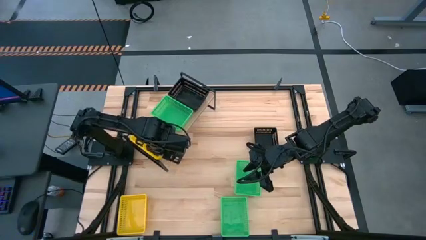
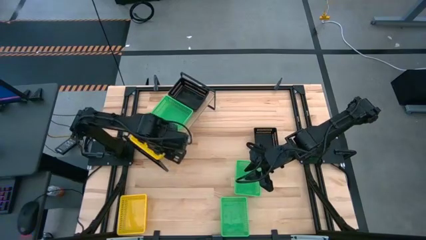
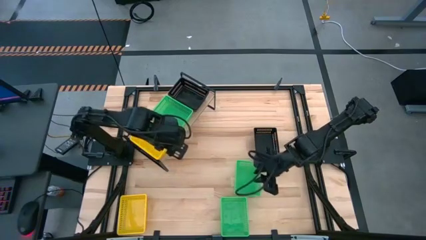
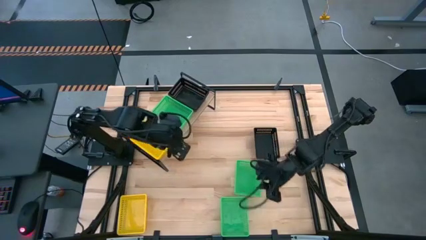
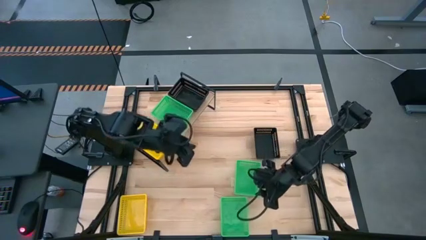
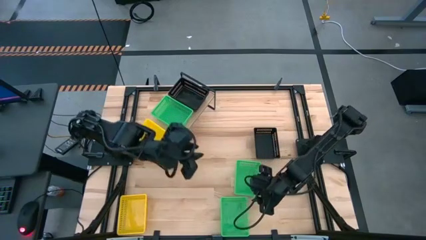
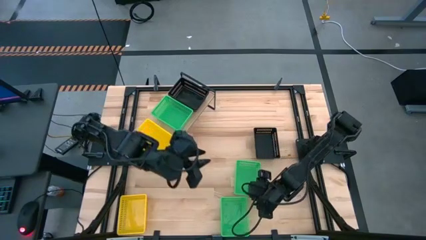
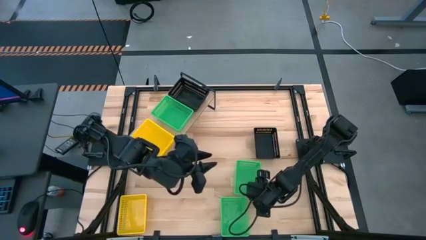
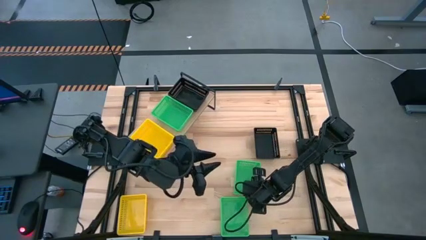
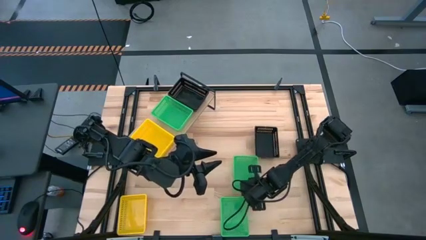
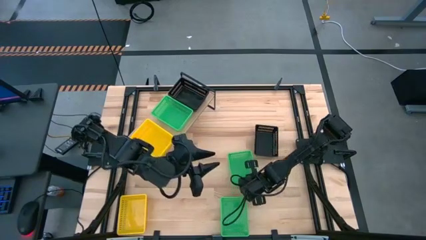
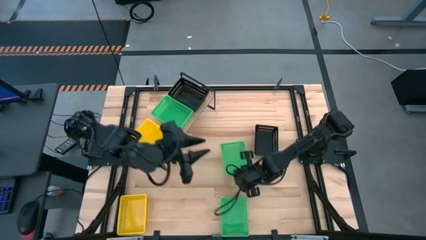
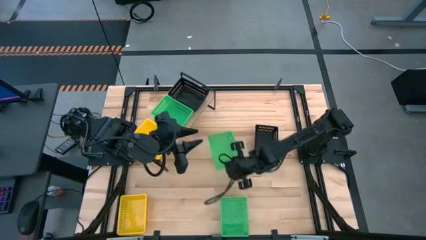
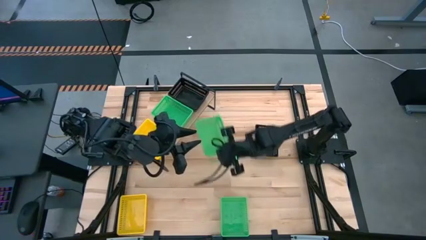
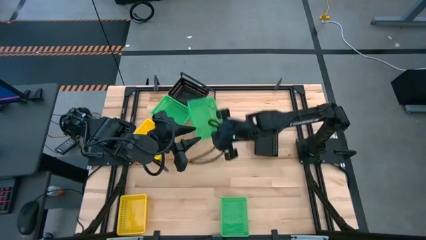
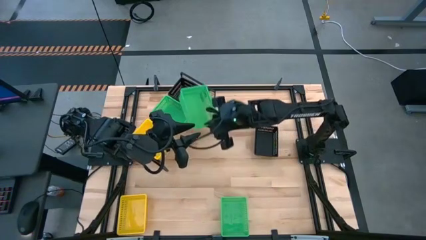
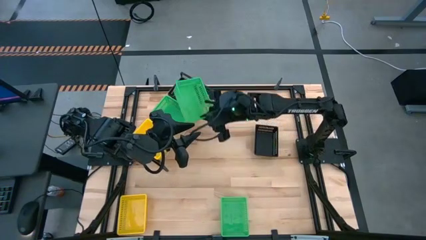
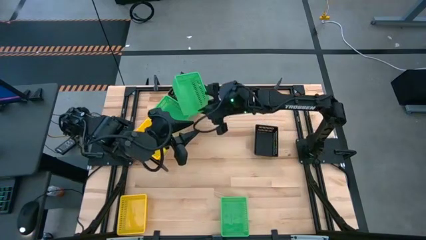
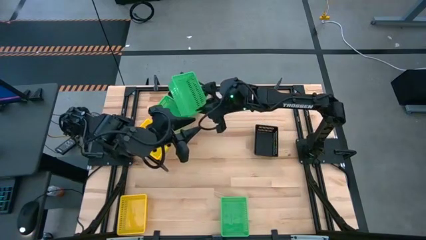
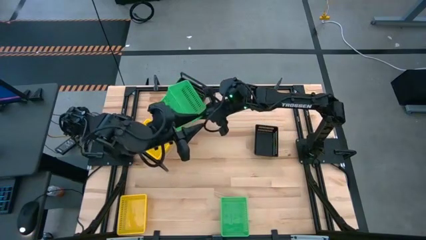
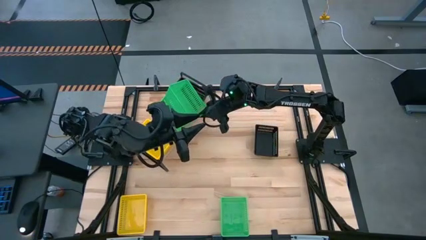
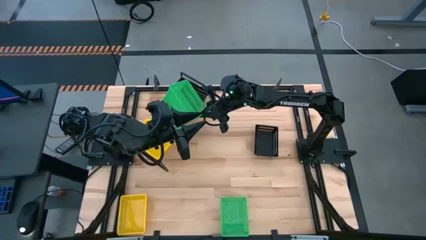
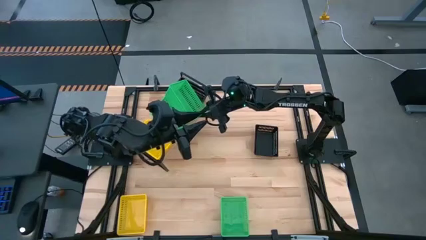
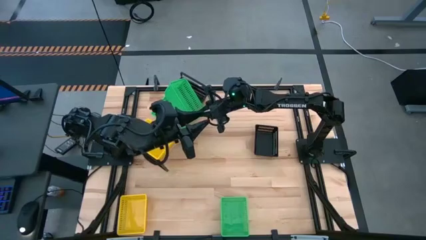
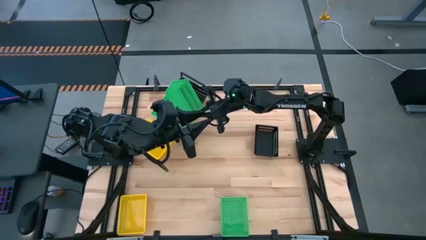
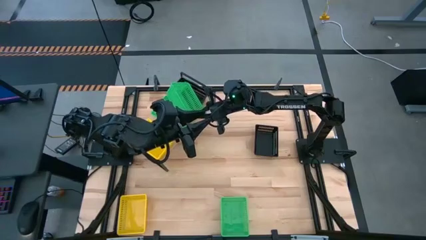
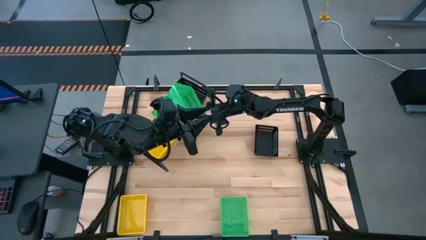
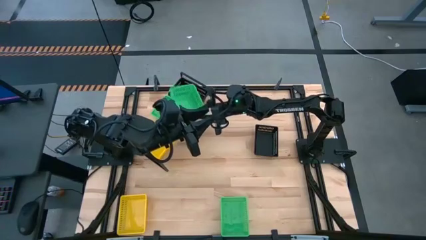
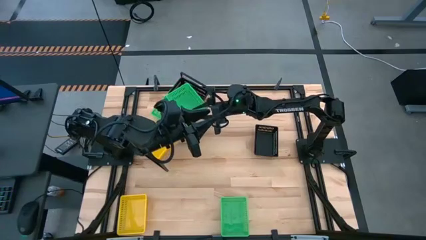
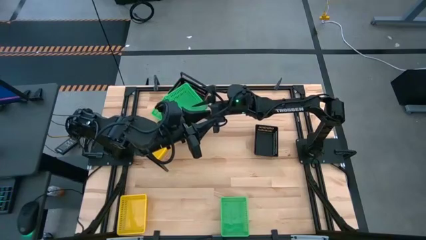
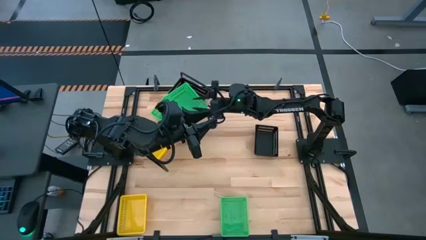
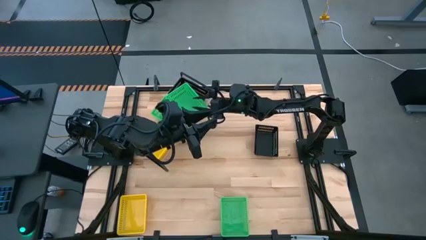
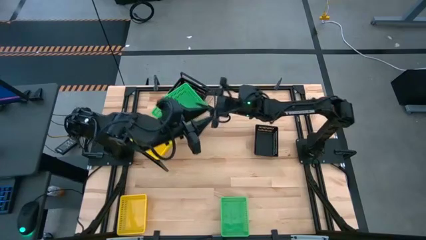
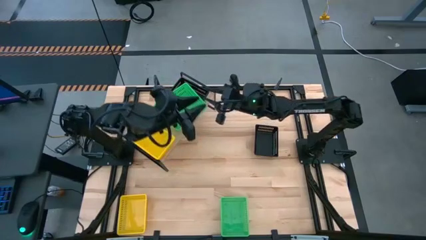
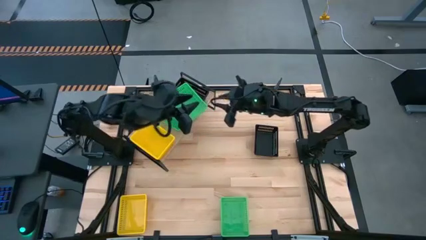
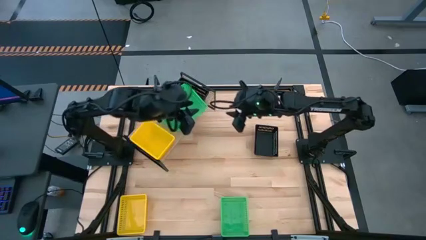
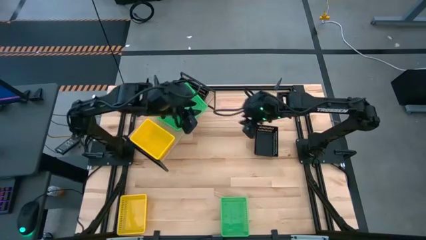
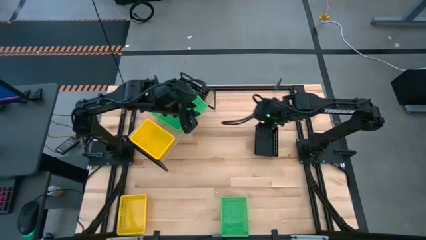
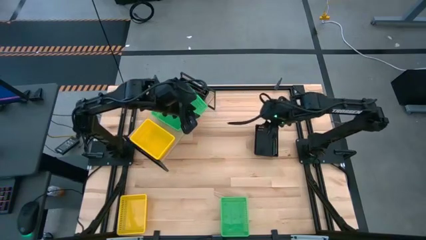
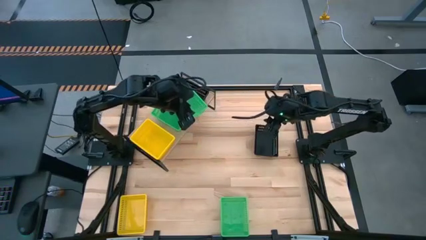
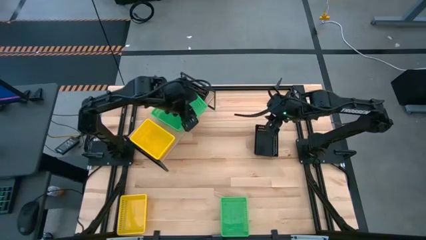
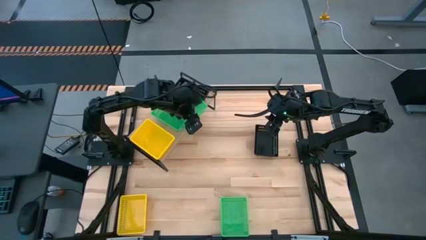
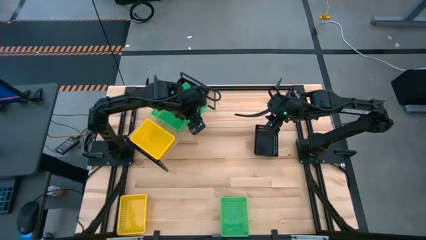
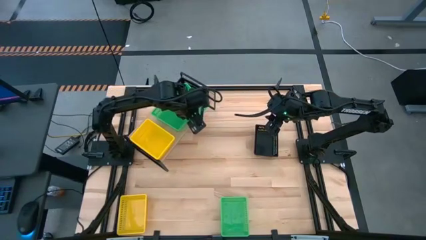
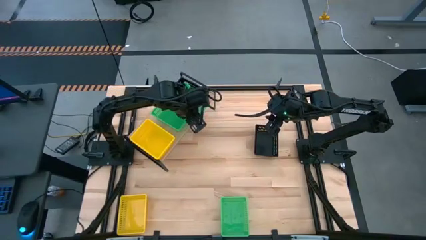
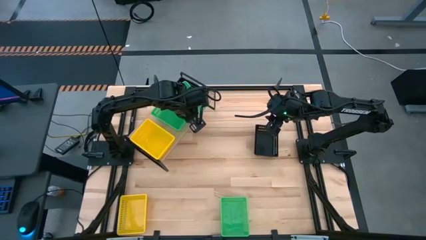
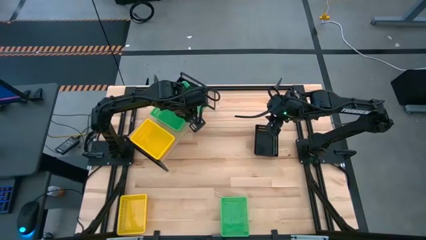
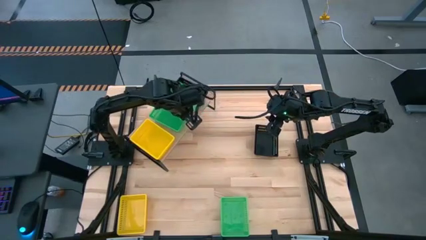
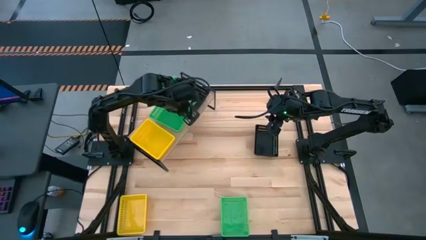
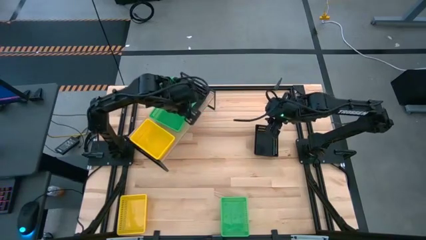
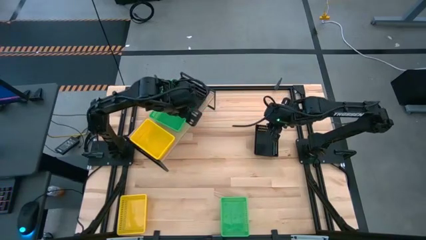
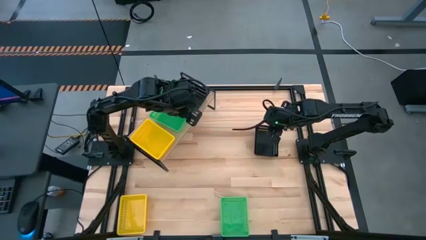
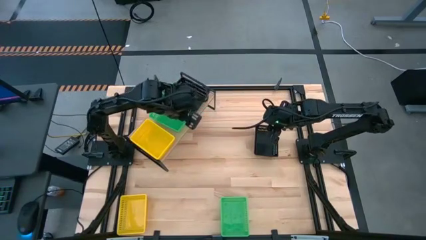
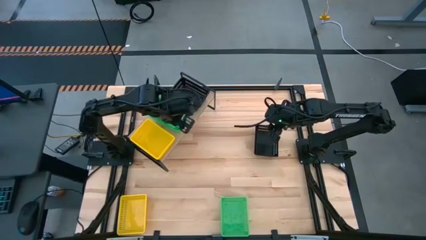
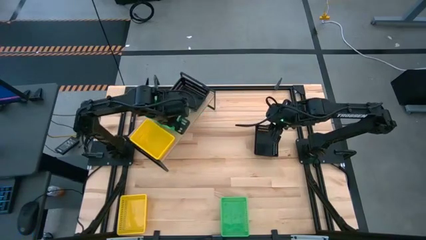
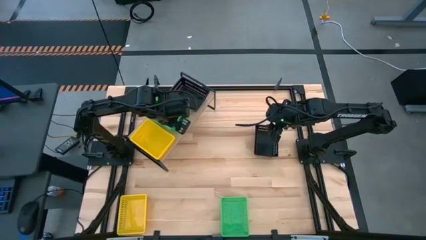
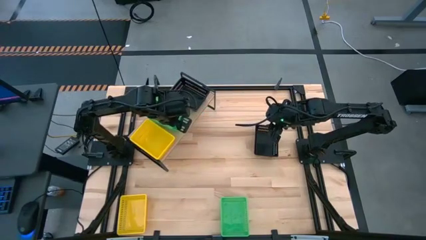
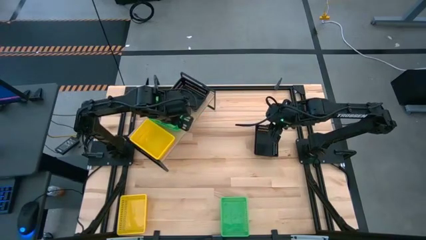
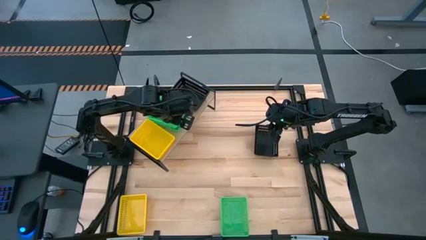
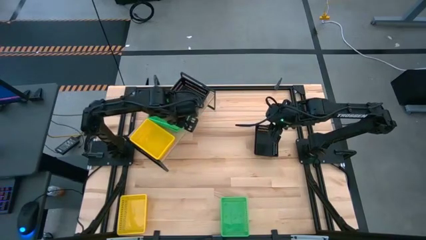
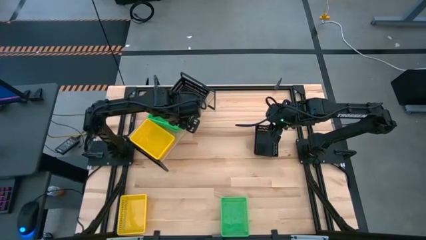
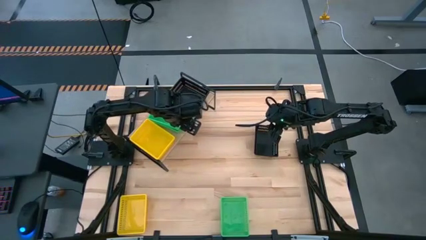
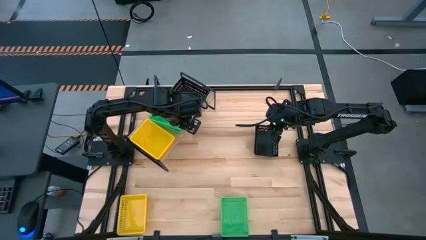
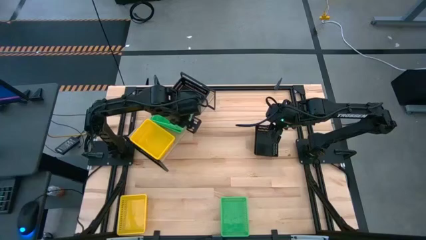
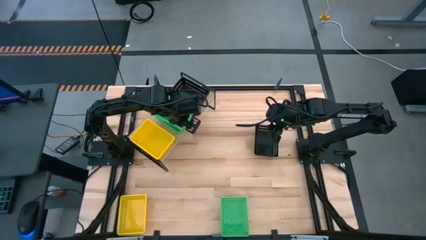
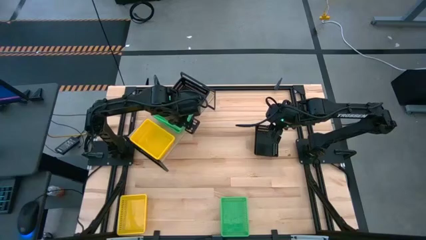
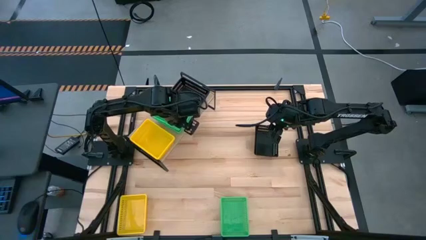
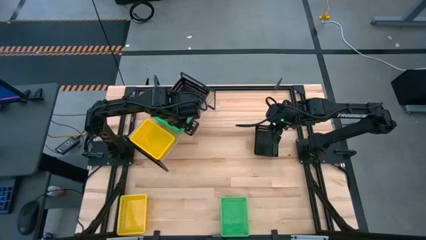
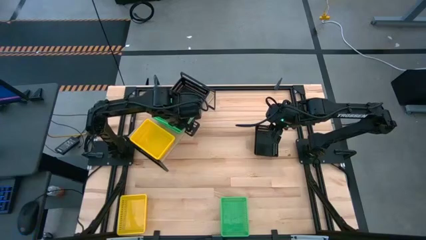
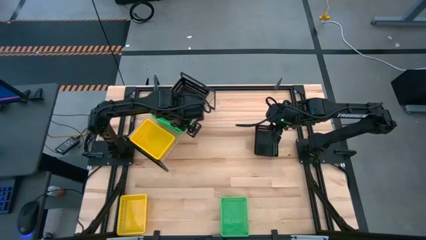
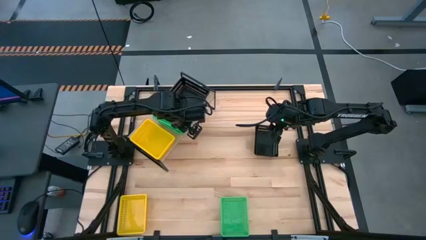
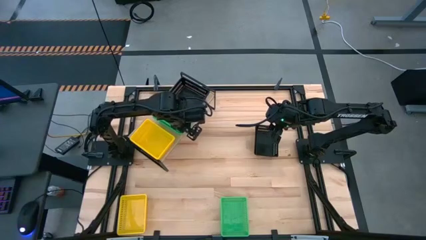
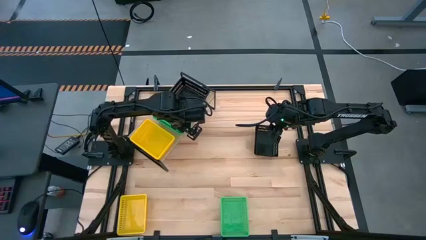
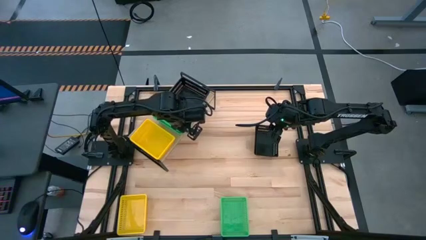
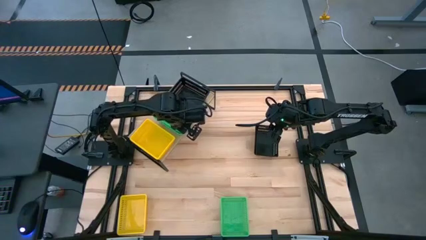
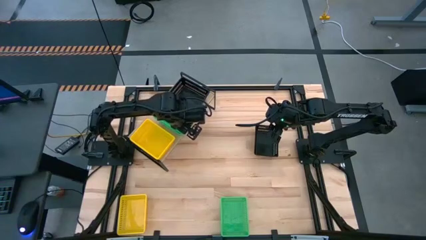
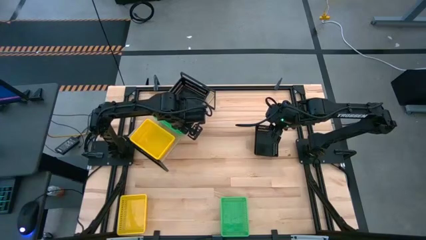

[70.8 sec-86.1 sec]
Task: Stack baskets on shelf by color
Stack the top green bin on top of the other green bin on the shelf
